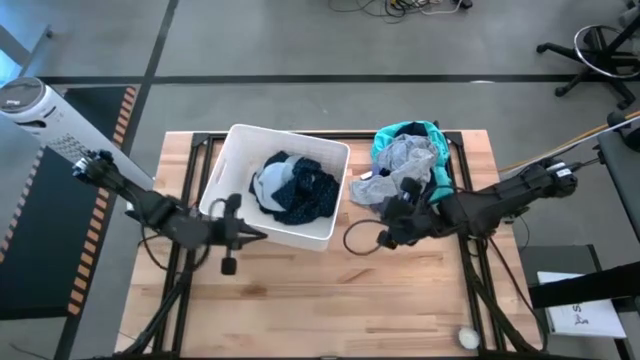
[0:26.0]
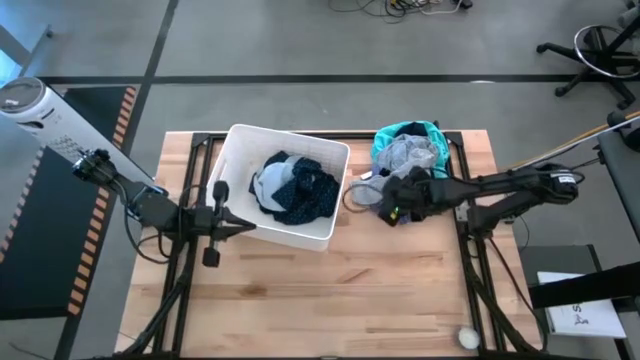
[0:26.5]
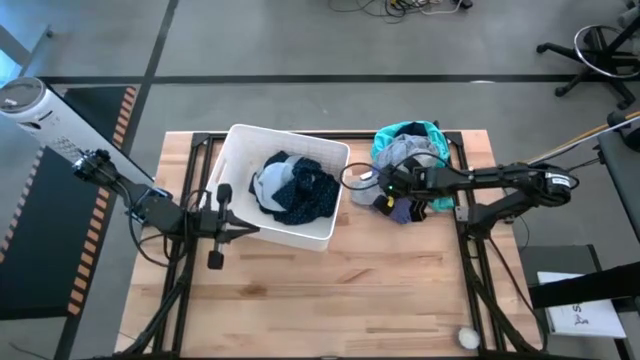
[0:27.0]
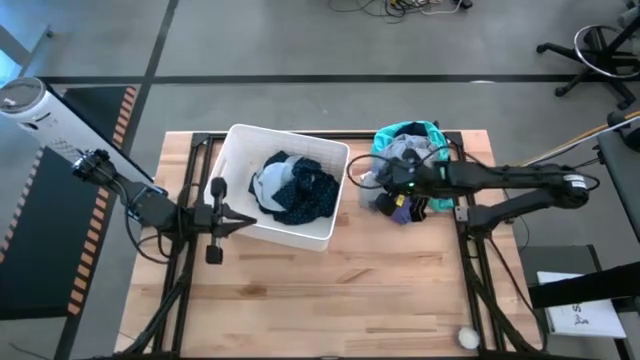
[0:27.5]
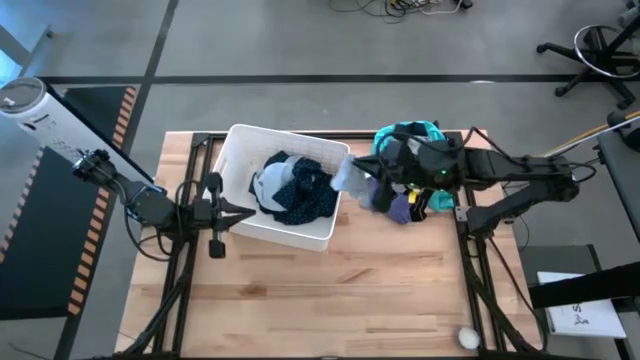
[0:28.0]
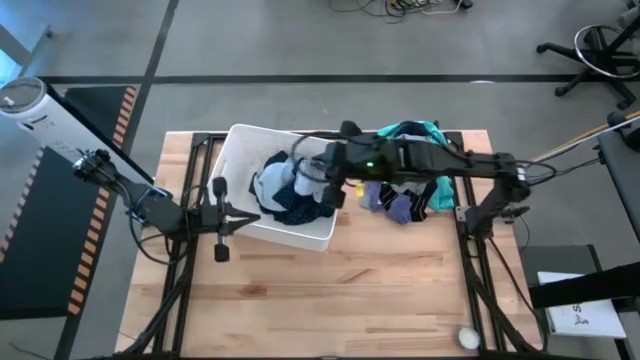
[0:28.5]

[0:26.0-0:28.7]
Task: Sort clothes
Put the gray sock into the white laundry bin

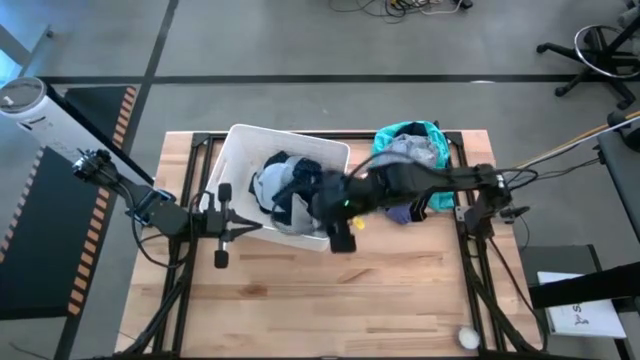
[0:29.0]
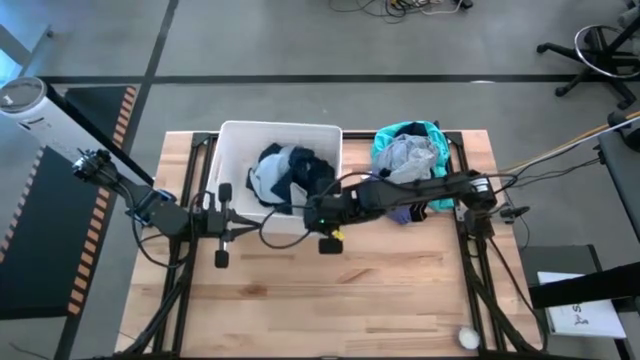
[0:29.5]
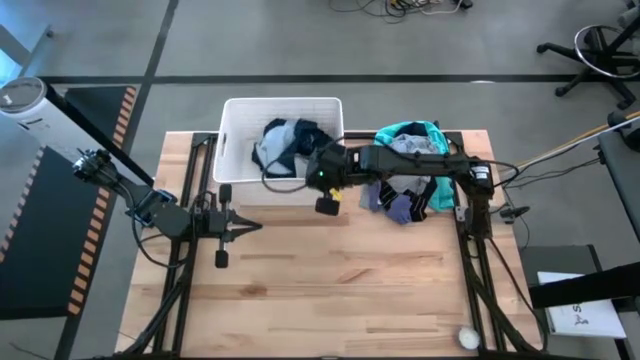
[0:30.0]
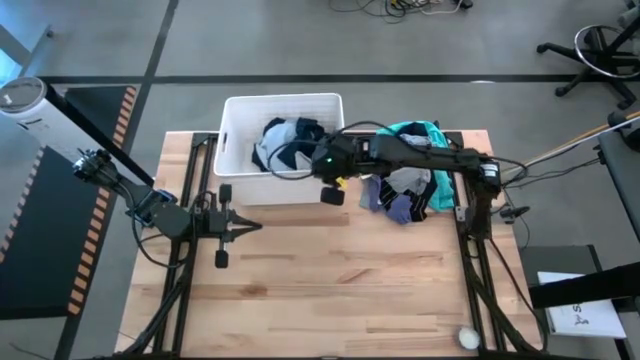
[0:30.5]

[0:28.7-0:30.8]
Move the white laundry bin to the top left of the table

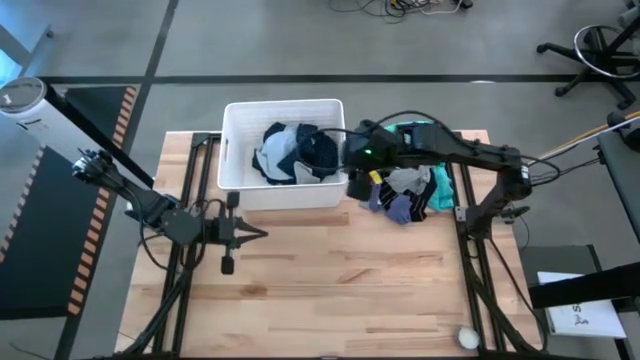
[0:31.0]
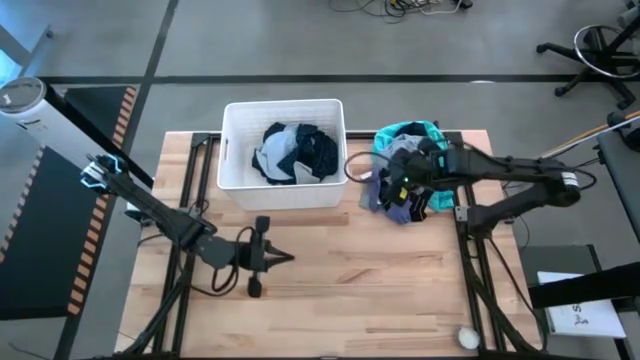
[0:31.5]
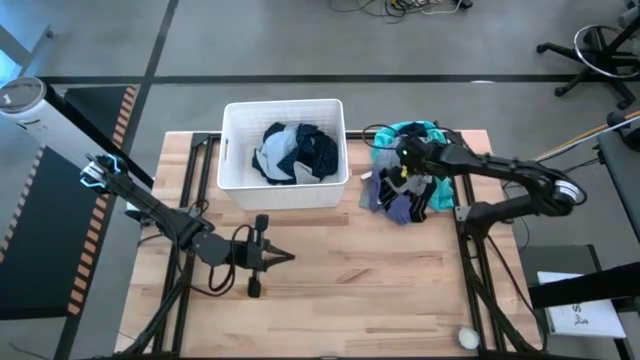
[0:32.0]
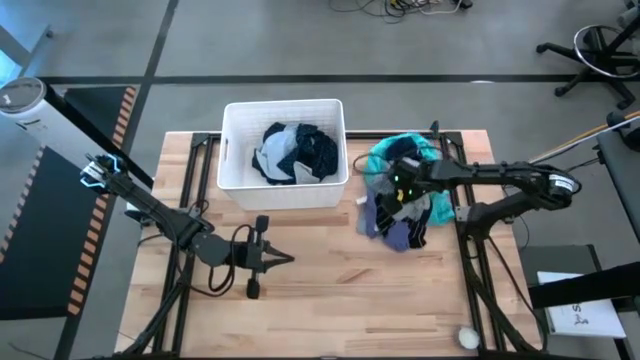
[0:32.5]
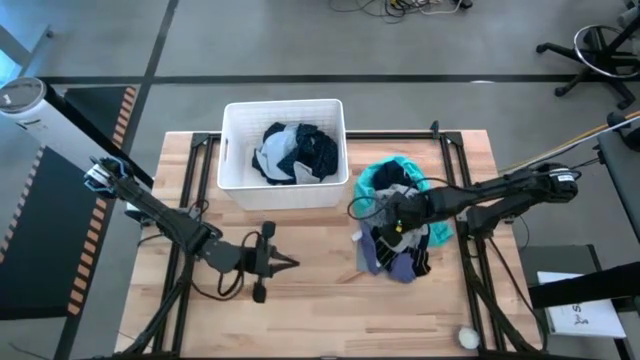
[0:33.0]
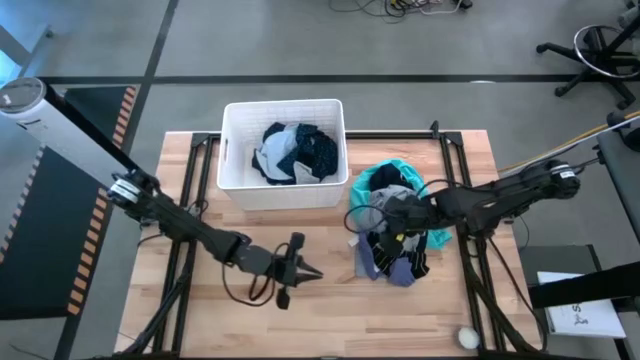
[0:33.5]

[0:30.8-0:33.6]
Move all the clothes to the middle right of the table

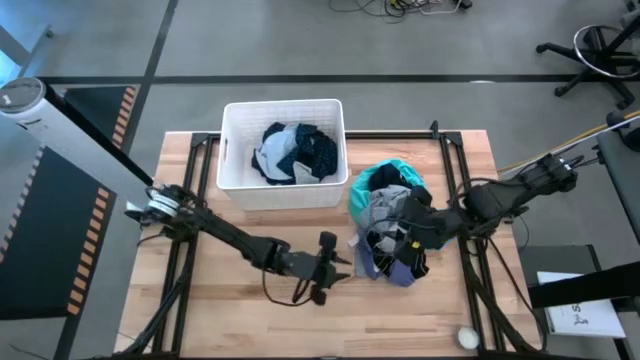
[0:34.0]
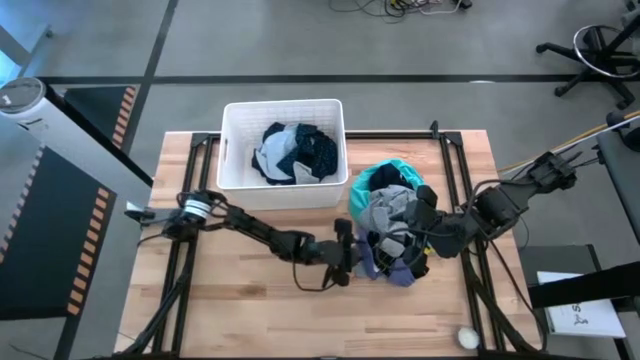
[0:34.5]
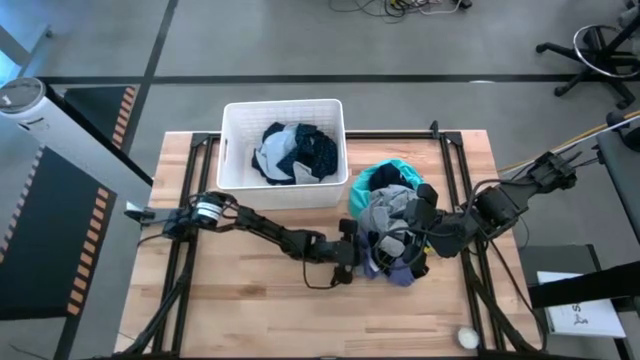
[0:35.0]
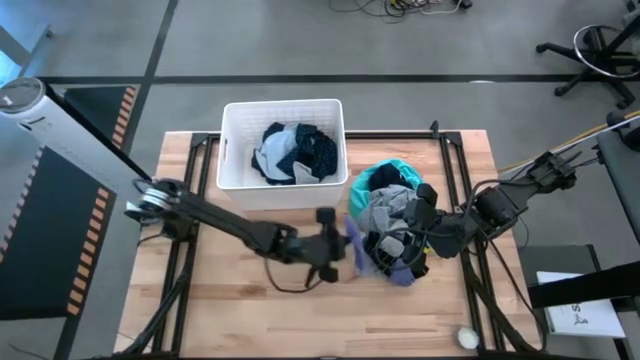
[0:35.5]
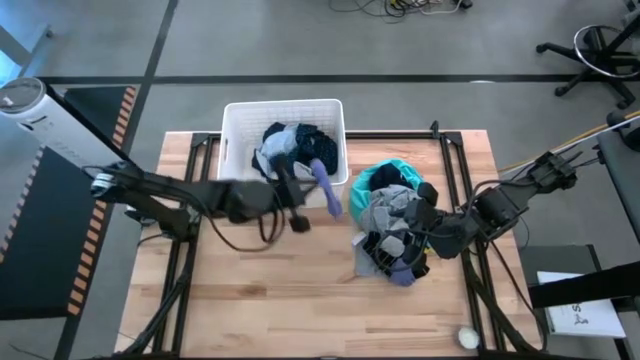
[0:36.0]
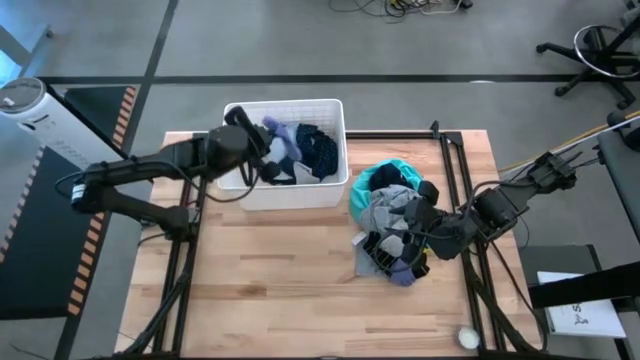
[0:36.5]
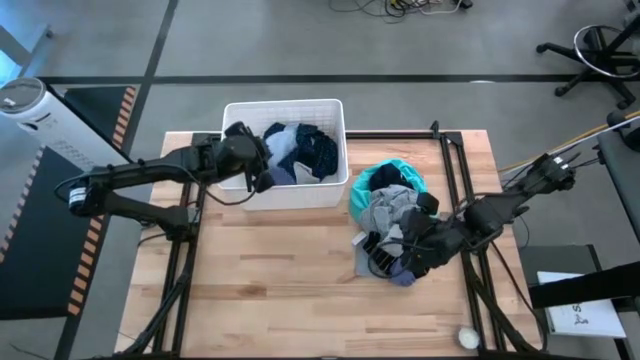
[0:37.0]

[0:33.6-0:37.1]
Put the purple sock into the white laundry bin

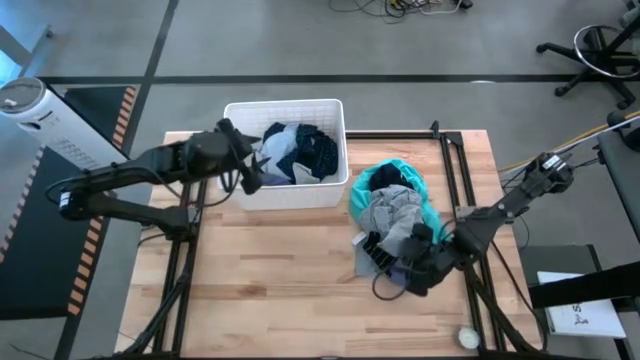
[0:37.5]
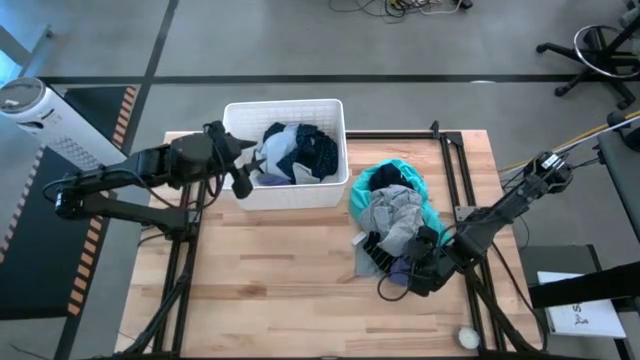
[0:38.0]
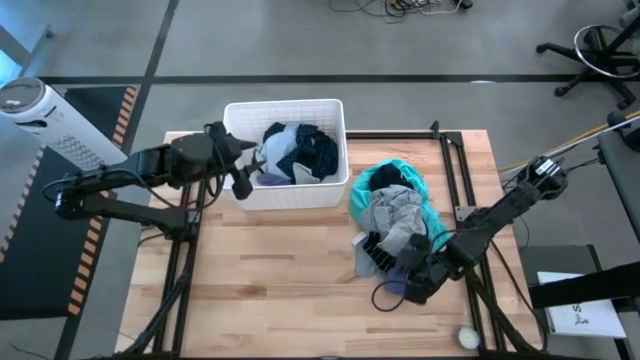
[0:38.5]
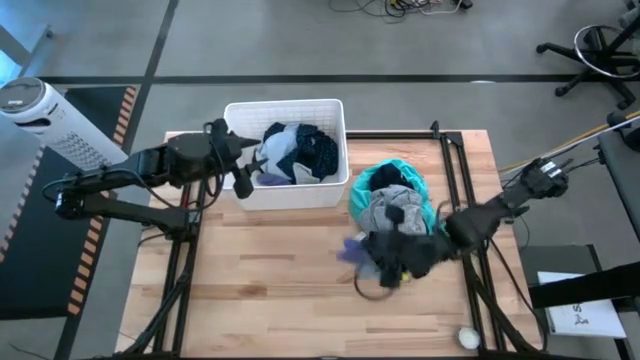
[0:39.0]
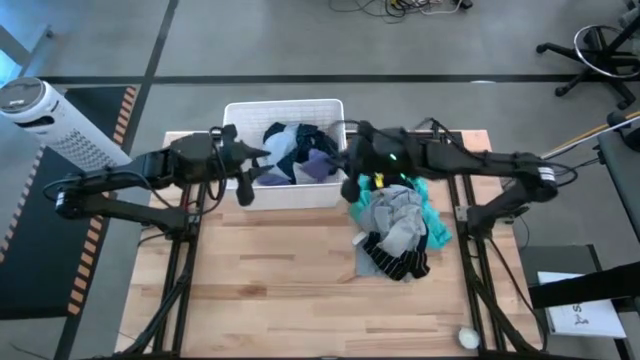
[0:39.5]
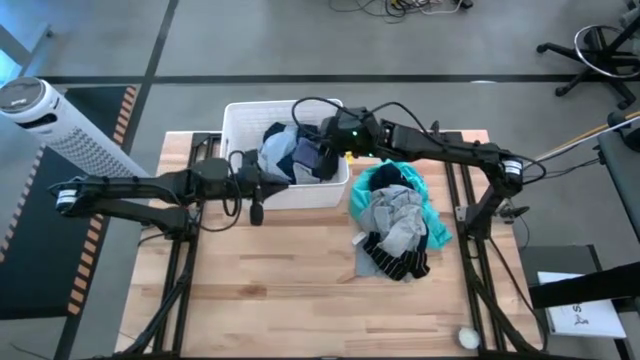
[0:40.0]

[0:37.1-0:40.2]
Put the purple sock into the white laundry bin

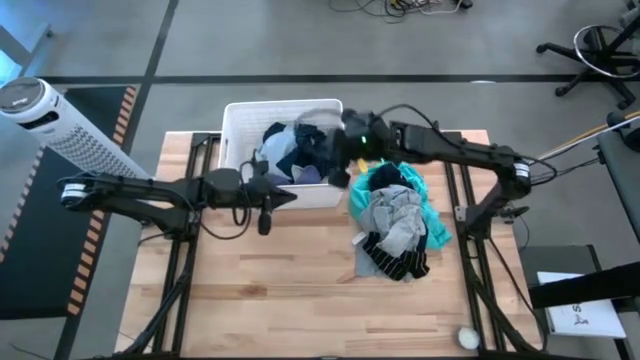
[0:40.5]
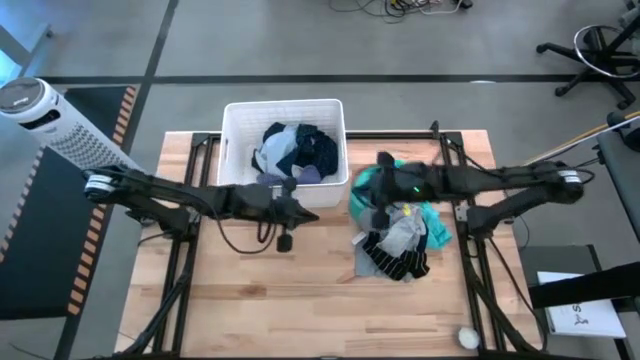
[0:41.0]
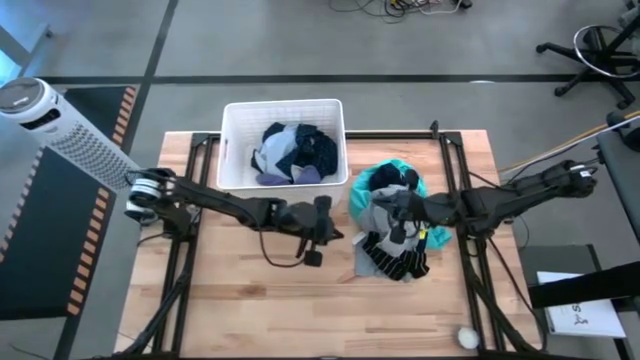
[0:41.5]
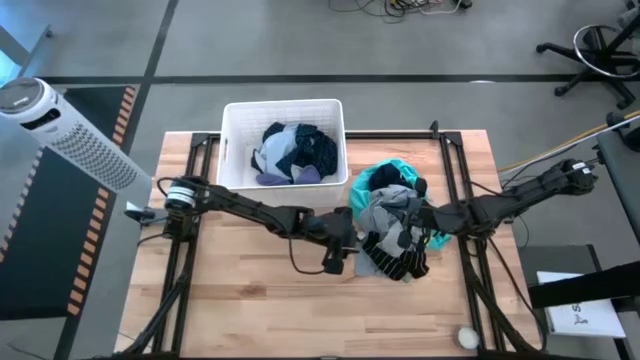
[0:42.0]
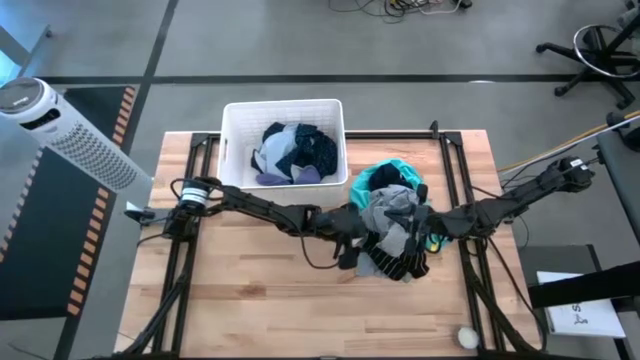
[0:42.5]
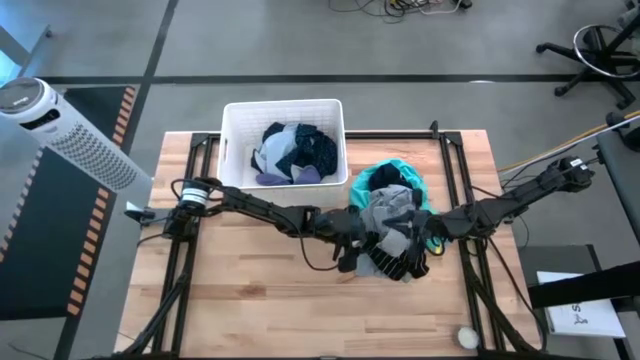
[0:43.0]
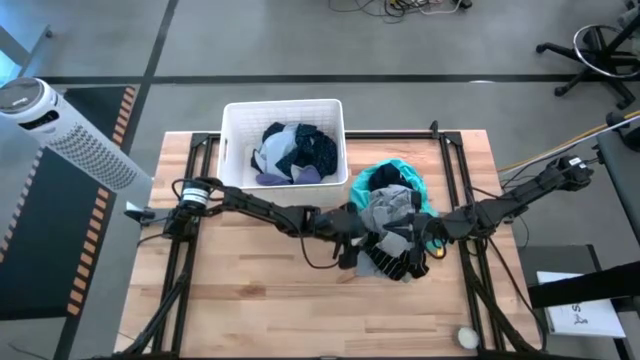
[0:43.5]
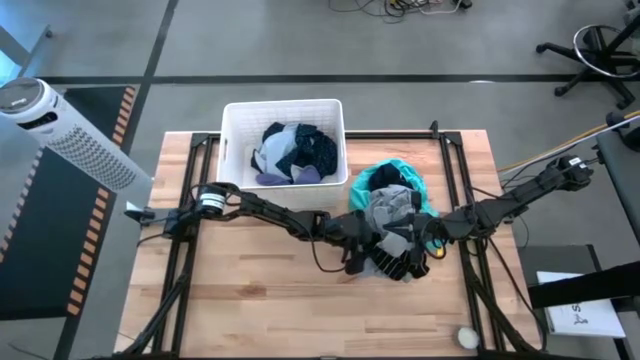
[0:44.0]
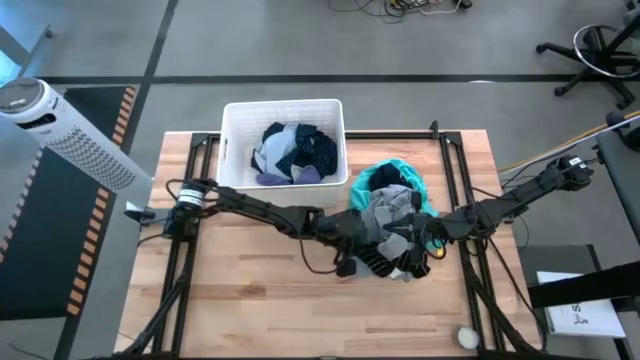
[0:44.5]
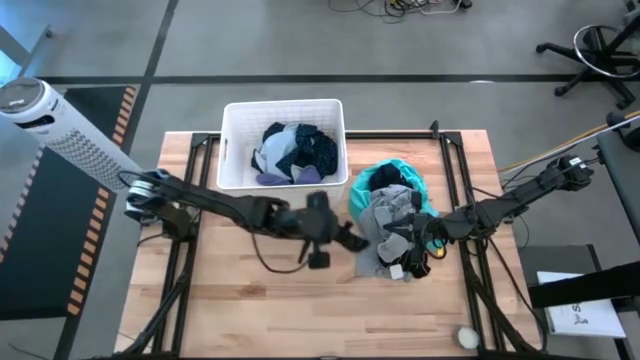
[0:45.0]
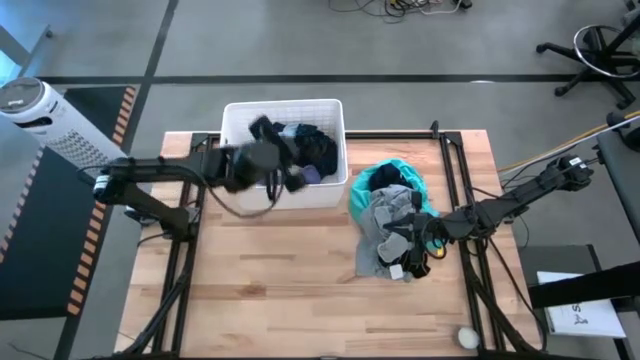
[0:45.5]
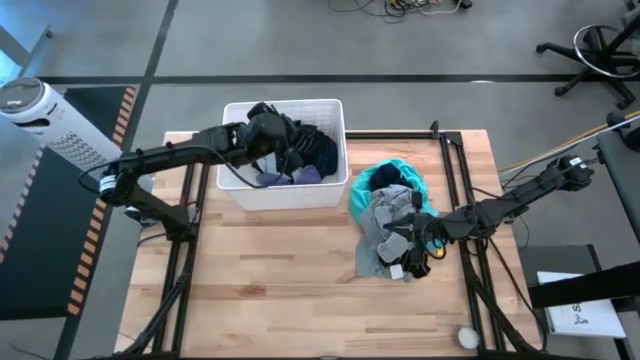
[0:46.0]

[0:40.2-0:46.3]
Put the black sock into the white laundry bin
